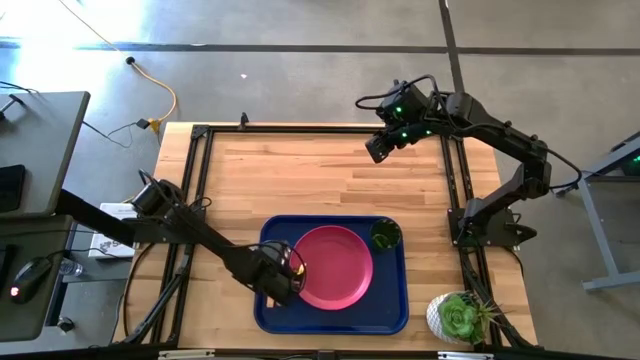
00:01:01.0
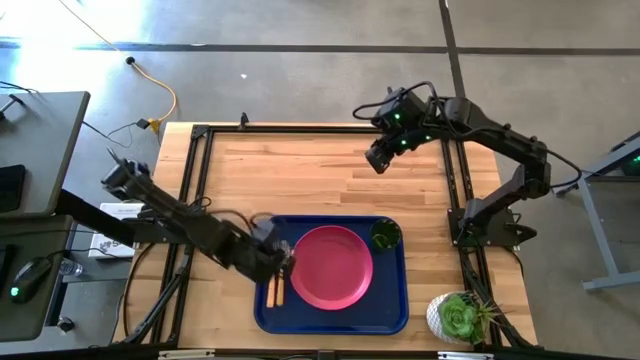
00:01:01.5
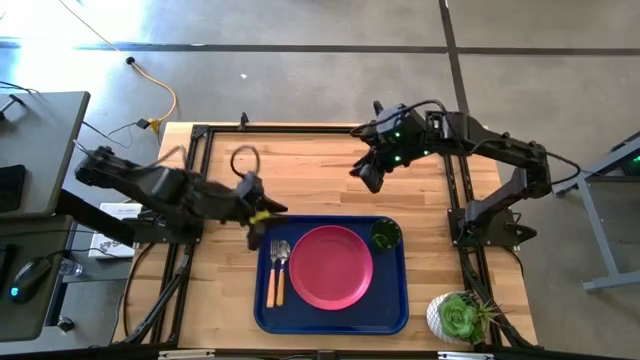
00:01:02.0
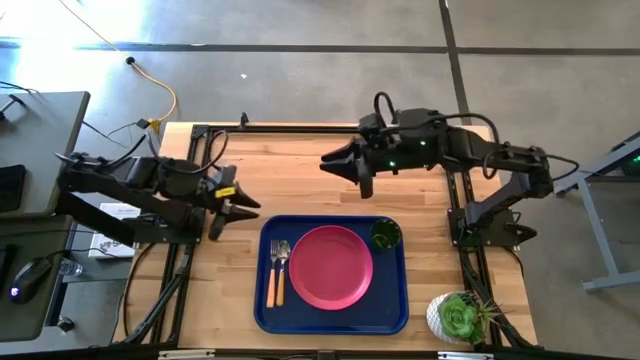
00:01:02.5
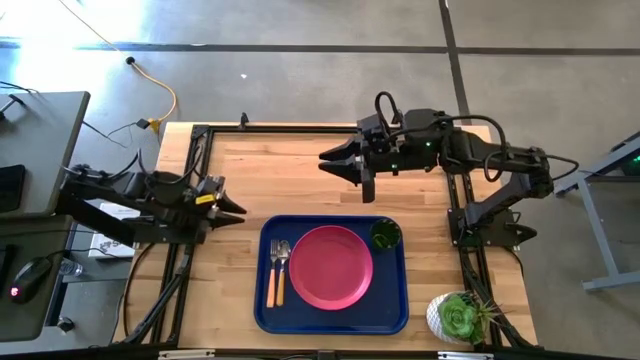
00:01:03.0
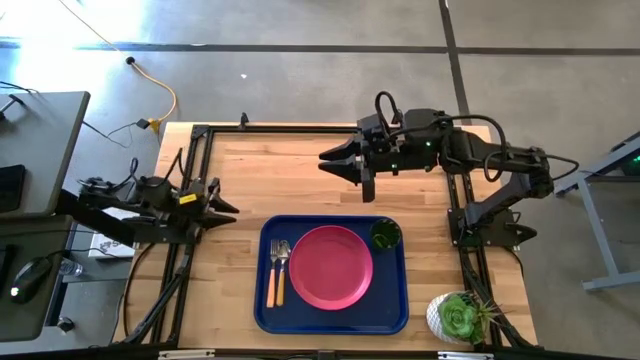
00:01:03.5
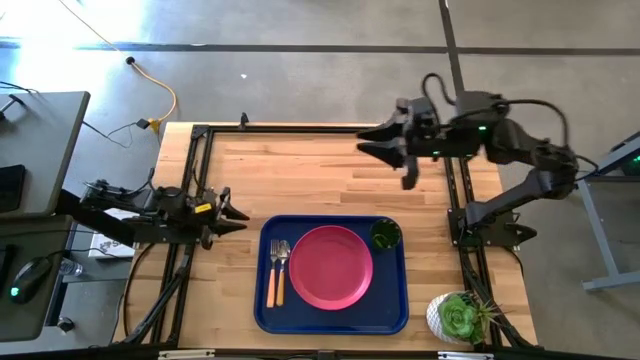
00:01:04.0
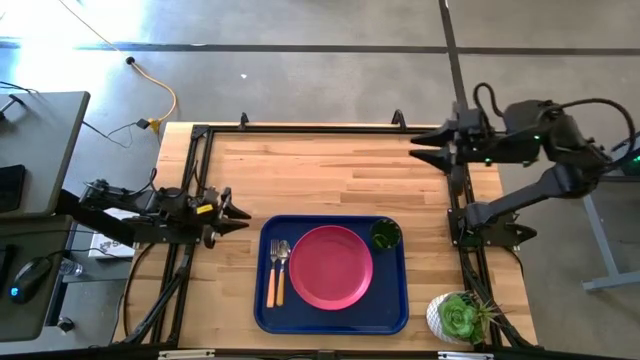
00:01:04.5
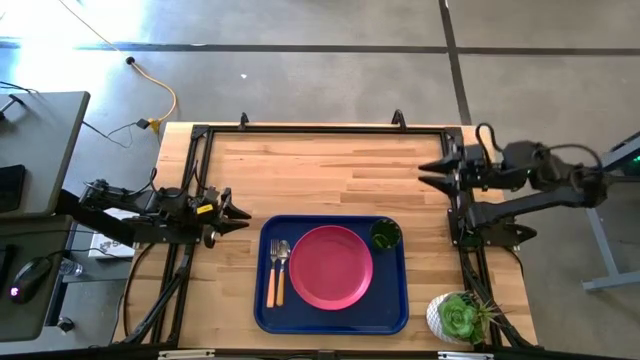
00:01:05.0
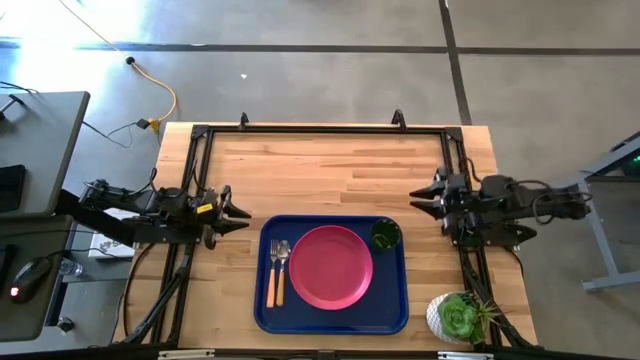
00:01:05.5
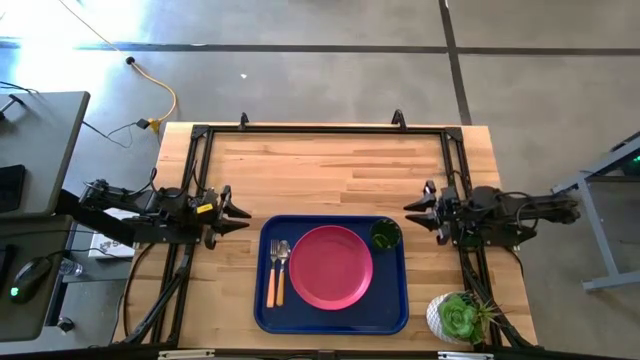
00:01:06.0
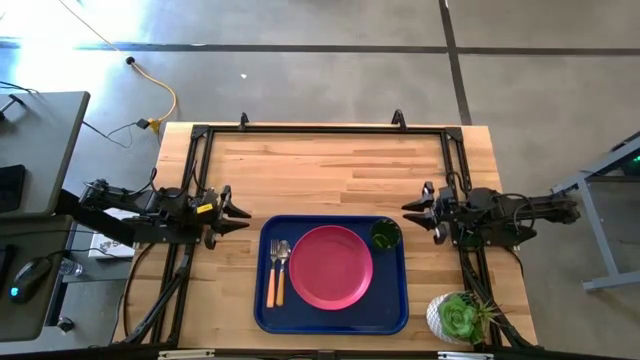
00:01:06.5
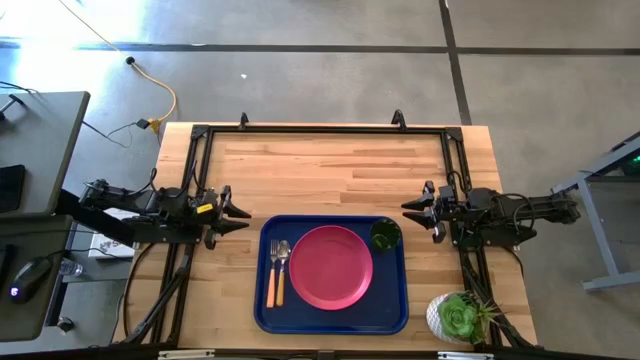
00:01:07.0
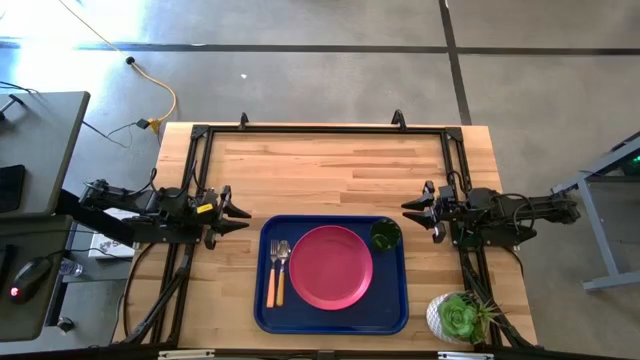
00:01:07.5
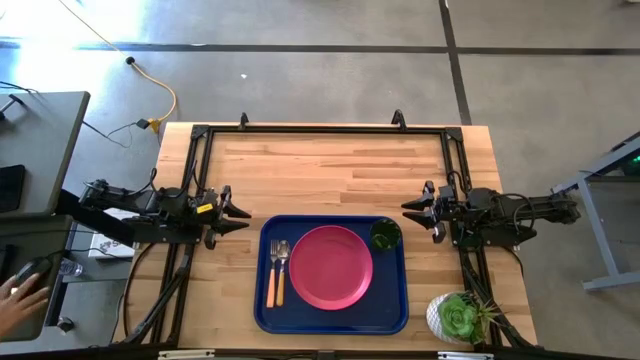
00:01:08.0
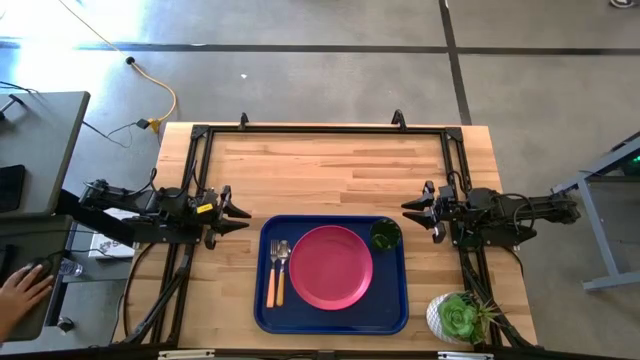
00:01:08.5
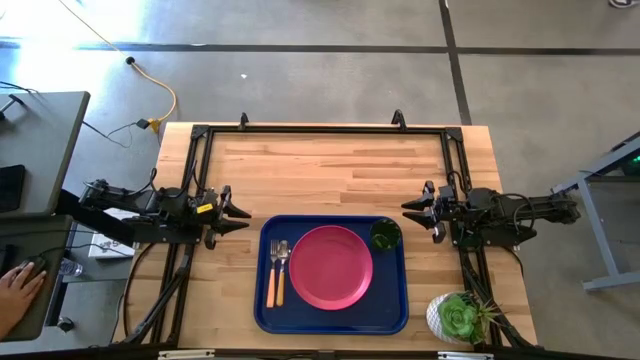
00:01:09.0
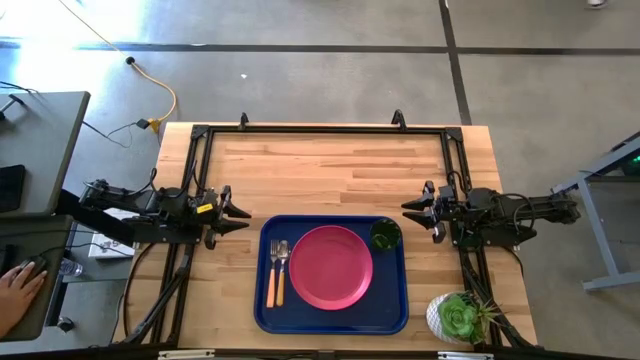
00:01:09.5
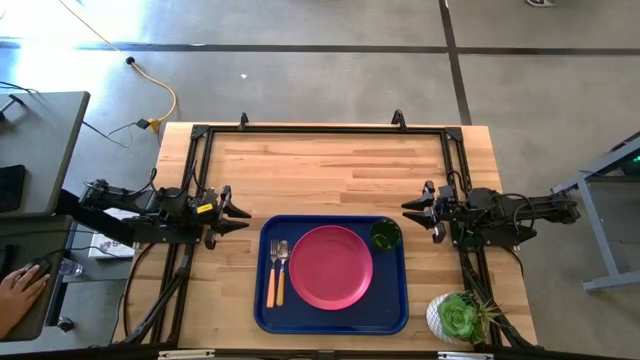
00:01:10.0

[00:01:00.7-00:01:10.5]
Task: Pick and place plate/cup/fork/spoon on tray
Return to Home Position

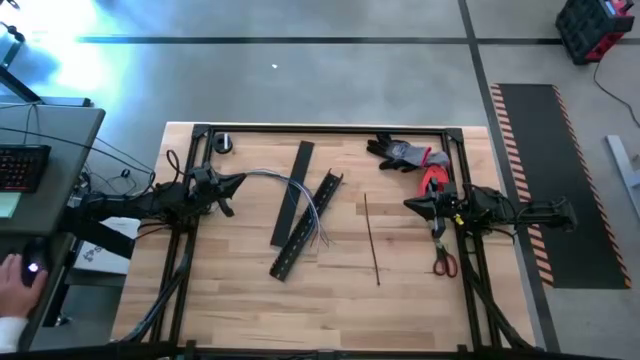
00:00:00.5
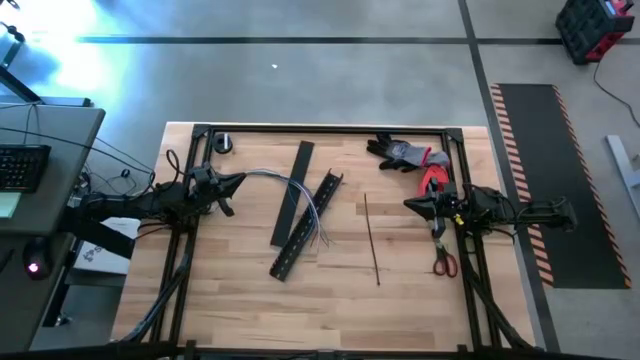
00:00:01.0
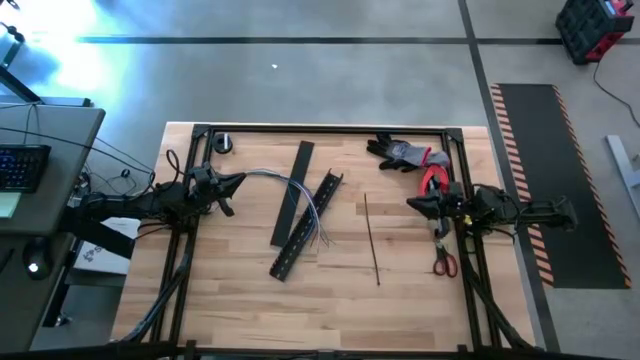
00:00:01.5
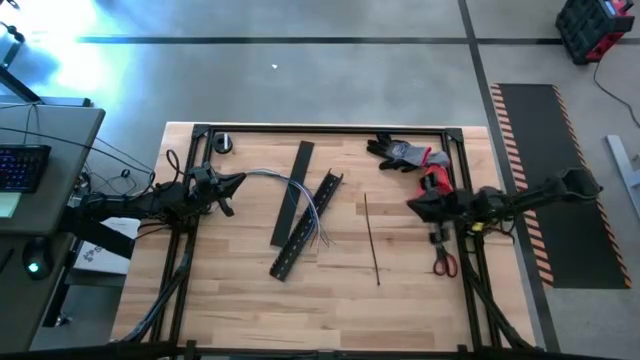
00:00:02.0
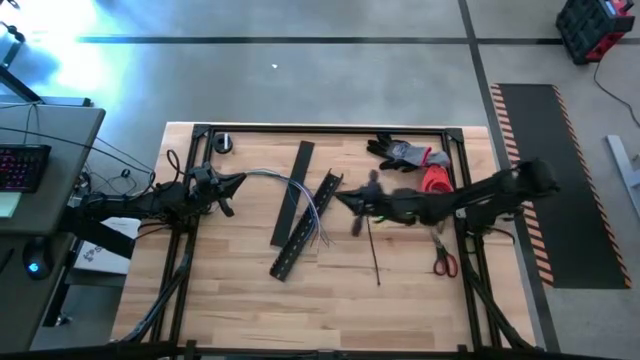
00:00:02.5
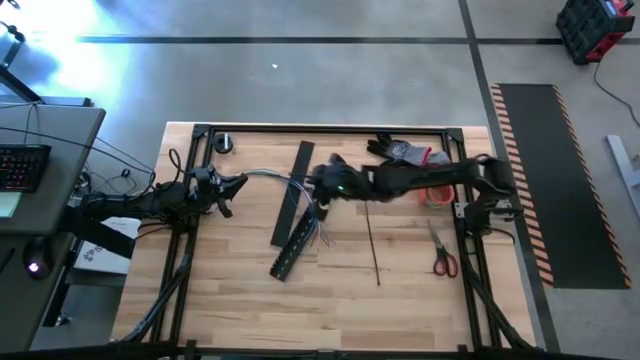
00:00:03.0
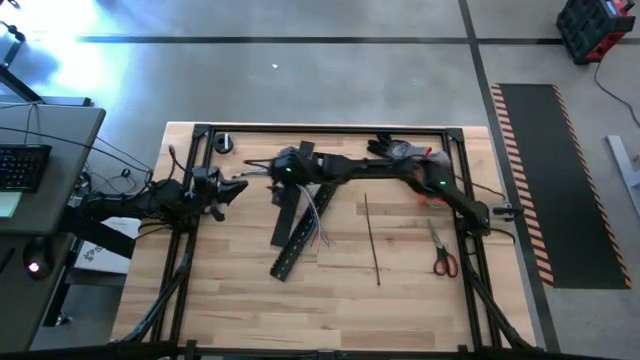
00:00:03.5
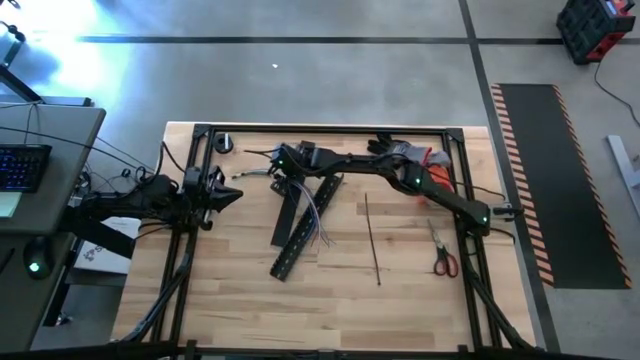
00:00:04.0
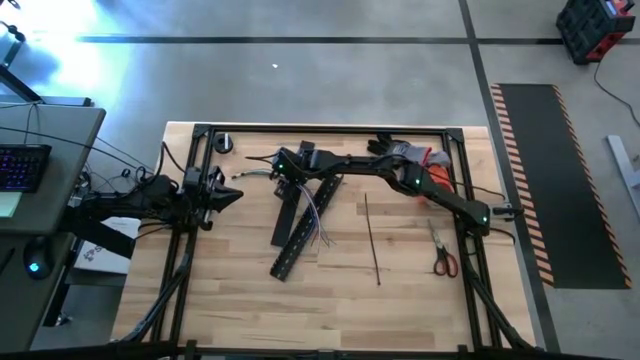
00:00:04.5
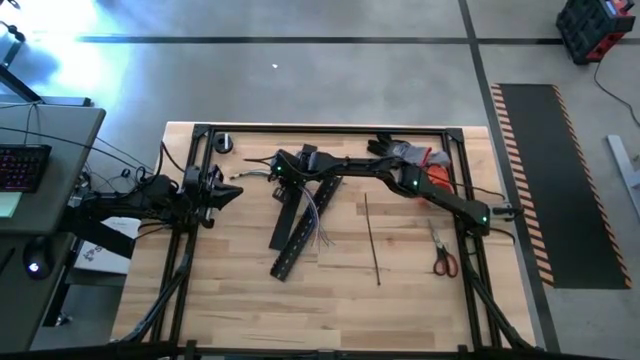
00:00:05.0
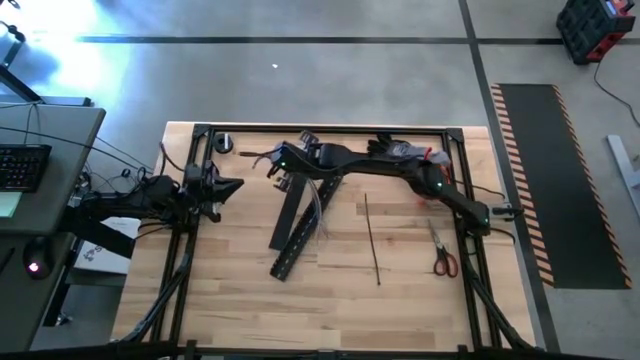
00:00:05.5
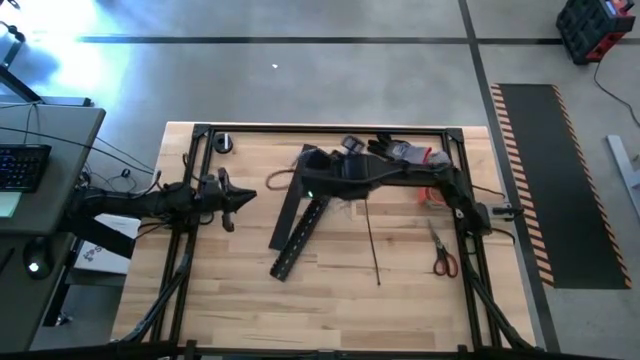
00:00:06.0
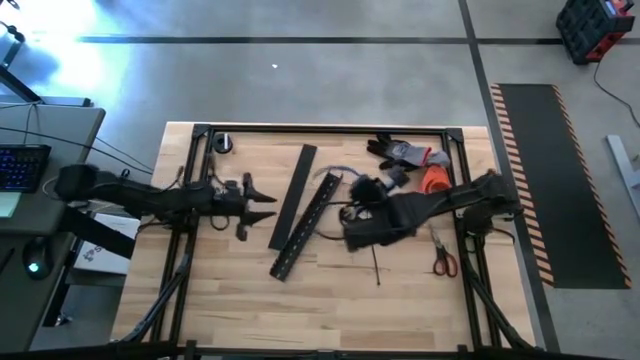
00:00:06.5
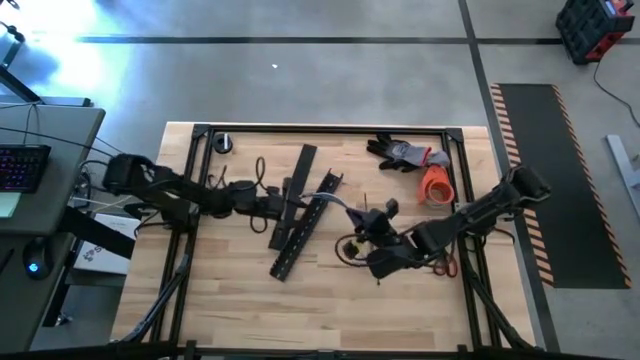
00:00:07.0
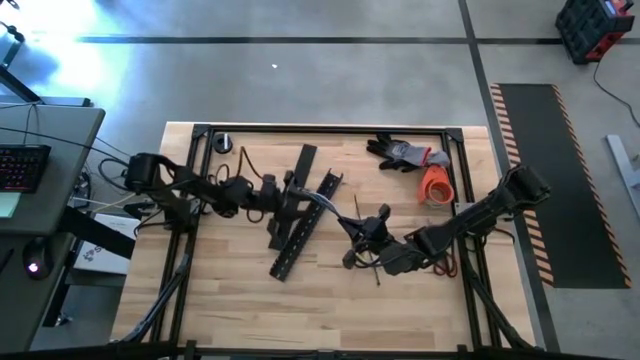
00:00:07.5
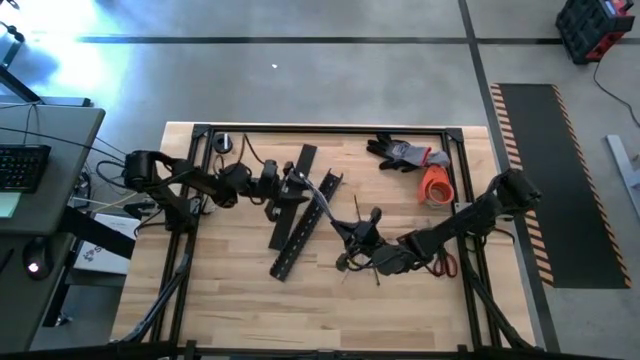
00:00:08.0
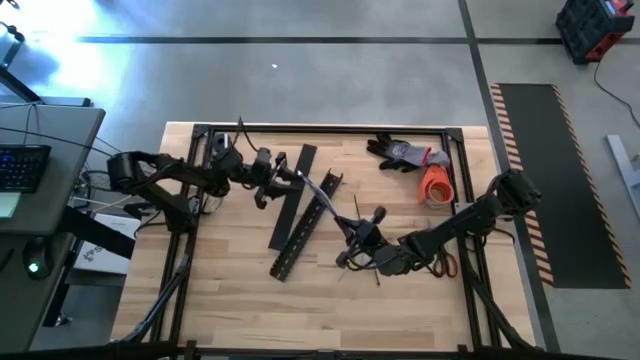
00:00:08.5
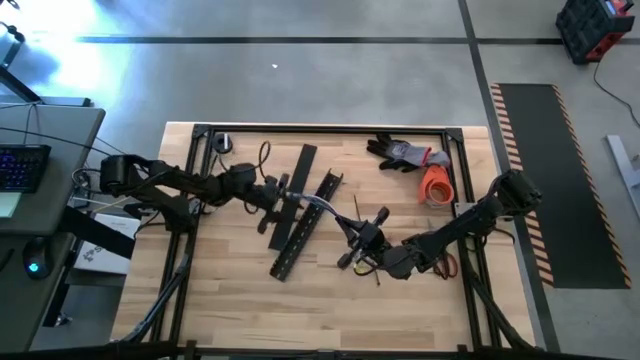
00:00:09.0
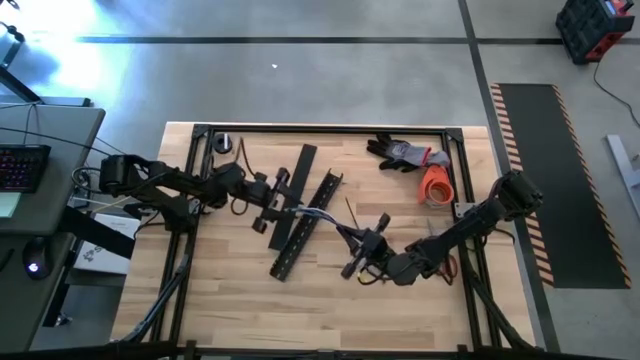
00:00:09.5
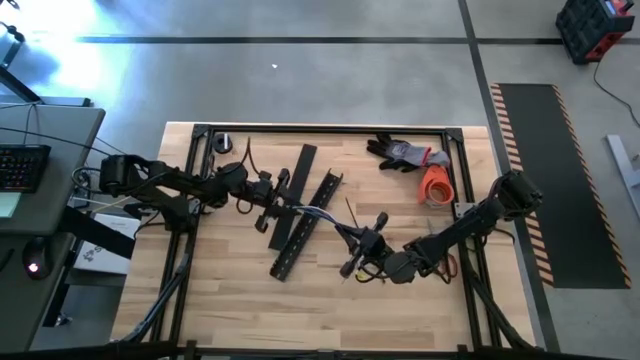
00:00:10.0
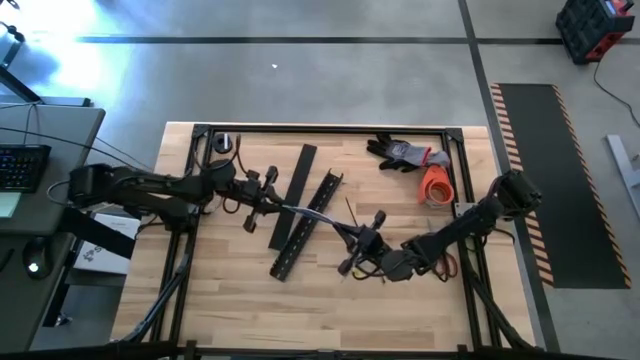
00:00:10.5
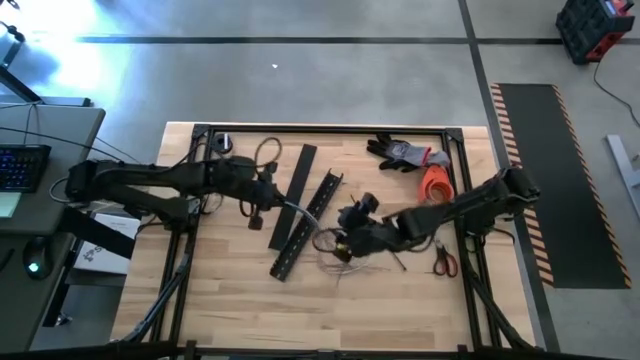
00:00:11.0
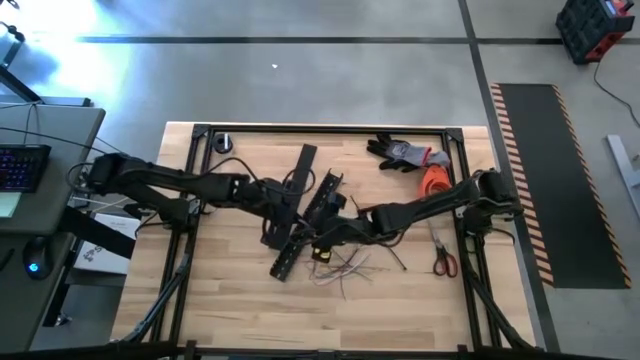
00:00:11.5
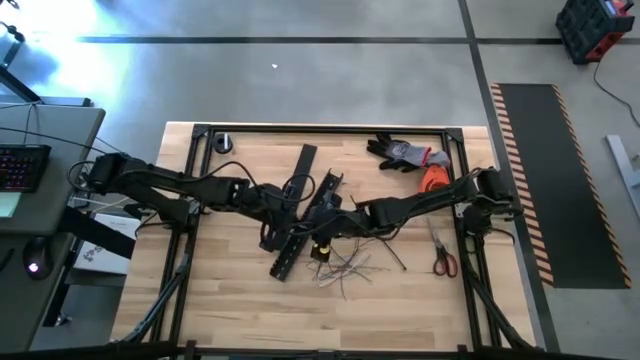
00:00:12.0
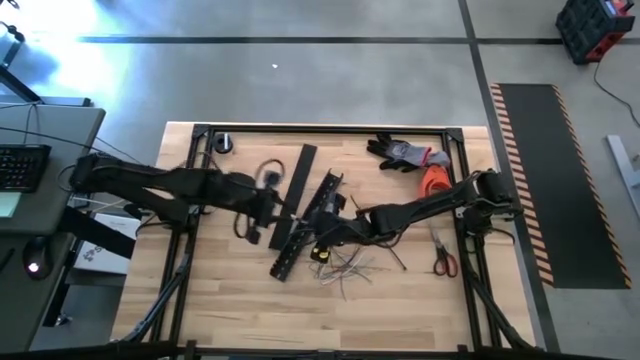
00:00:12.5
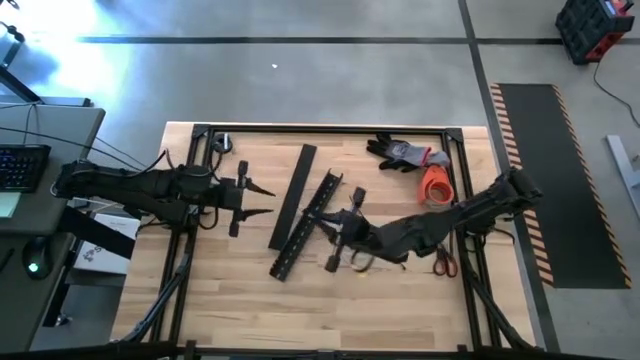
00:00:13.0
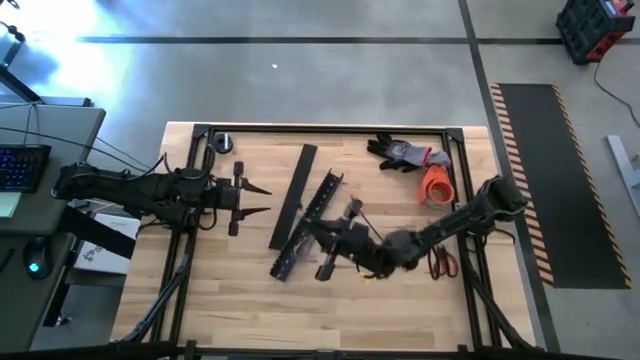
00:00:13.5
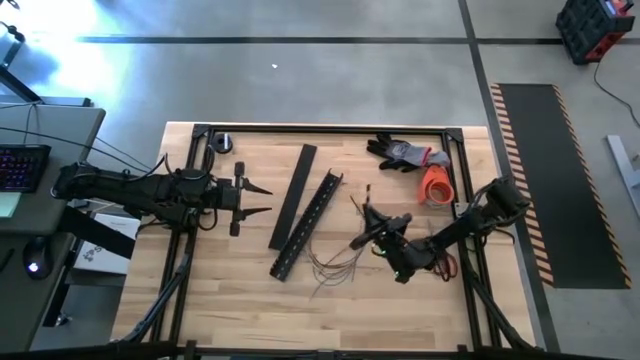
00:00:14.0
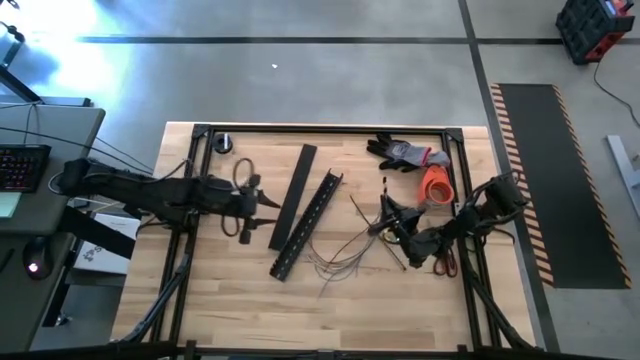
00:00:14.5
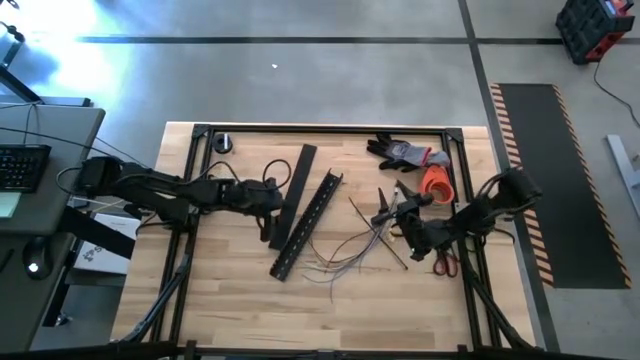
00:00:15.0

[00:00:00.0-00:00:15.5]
Task: Ziptie cables
Wrap the cables together using a zip tie
